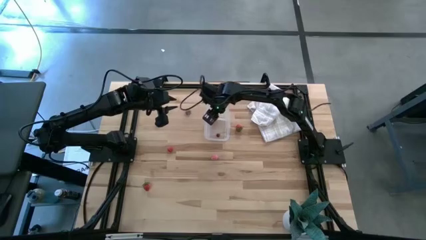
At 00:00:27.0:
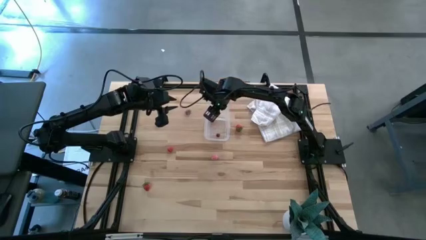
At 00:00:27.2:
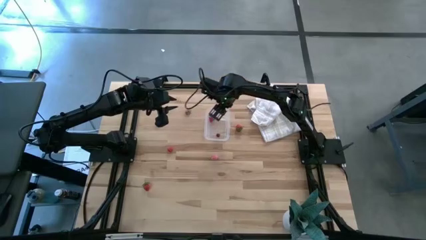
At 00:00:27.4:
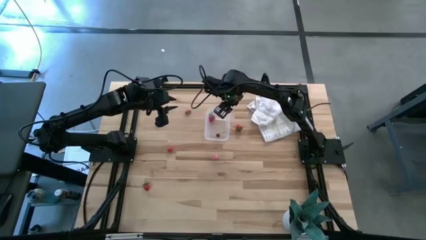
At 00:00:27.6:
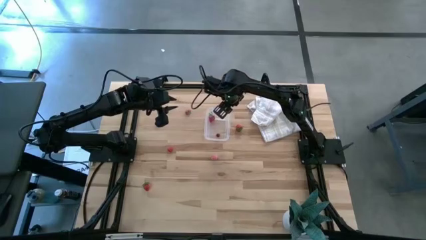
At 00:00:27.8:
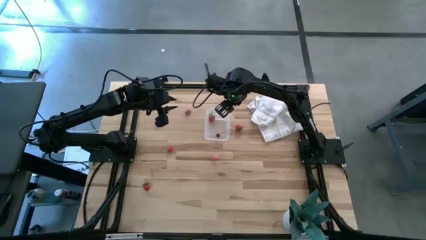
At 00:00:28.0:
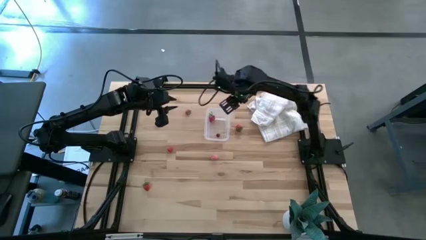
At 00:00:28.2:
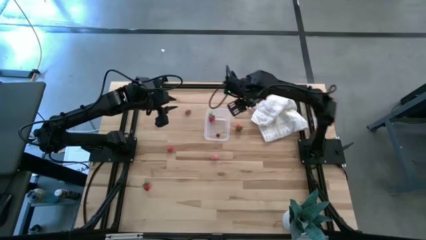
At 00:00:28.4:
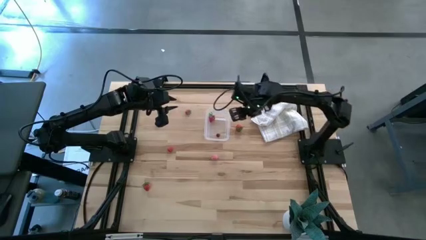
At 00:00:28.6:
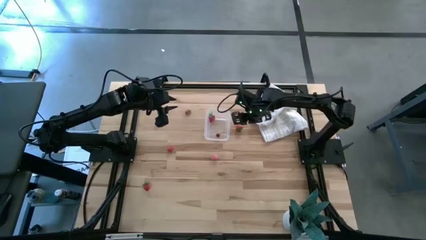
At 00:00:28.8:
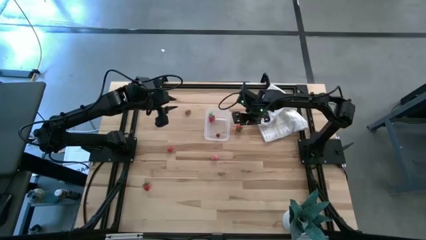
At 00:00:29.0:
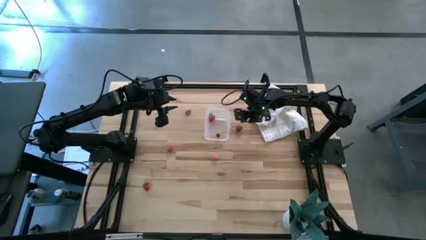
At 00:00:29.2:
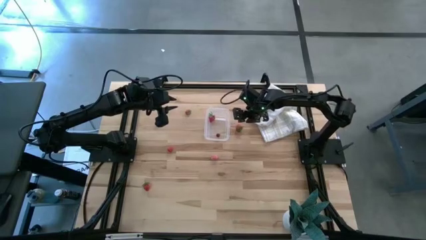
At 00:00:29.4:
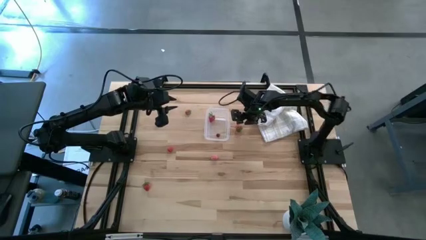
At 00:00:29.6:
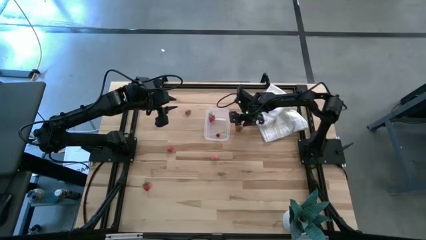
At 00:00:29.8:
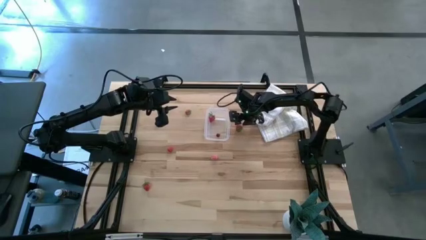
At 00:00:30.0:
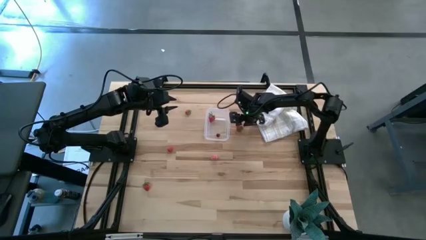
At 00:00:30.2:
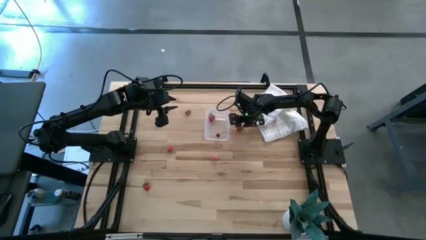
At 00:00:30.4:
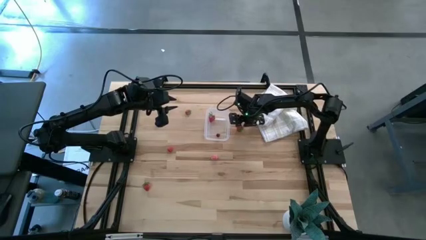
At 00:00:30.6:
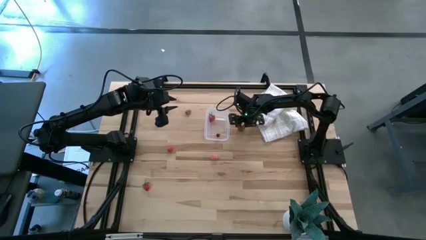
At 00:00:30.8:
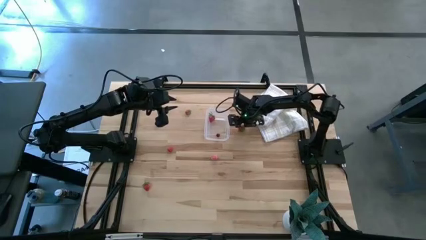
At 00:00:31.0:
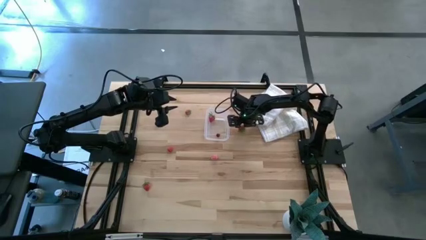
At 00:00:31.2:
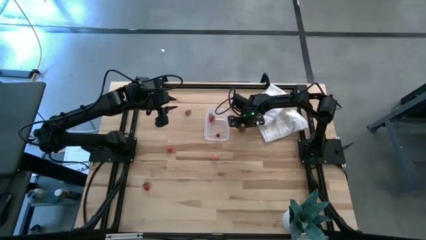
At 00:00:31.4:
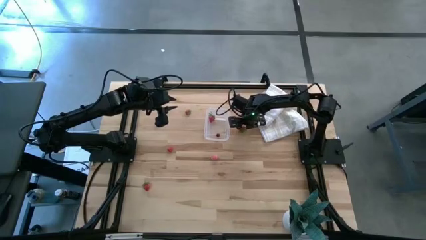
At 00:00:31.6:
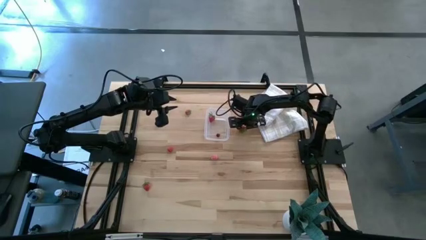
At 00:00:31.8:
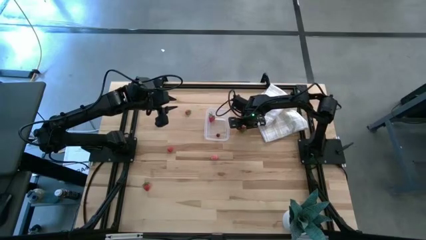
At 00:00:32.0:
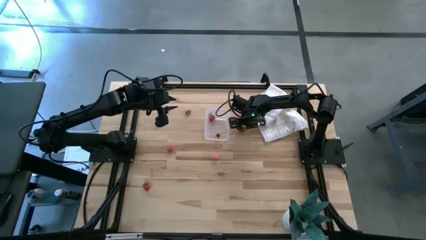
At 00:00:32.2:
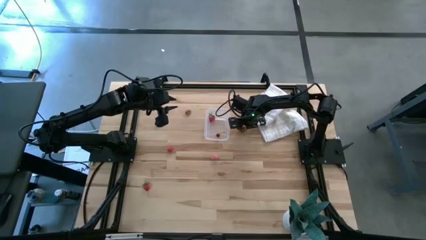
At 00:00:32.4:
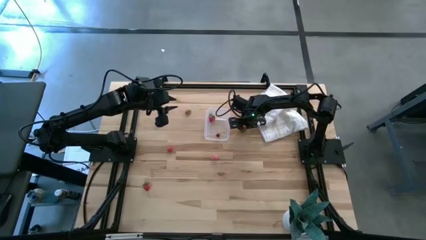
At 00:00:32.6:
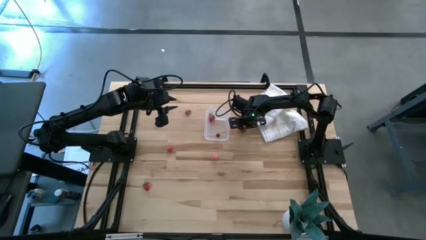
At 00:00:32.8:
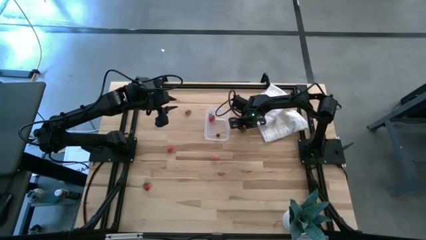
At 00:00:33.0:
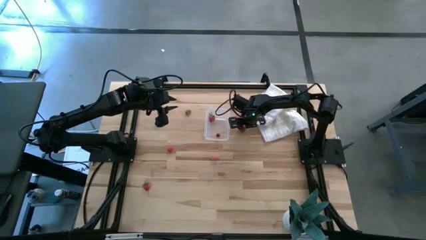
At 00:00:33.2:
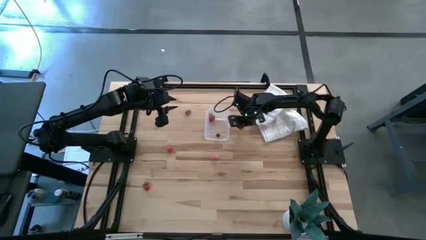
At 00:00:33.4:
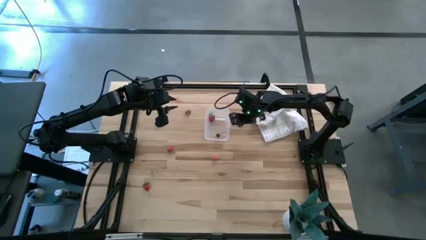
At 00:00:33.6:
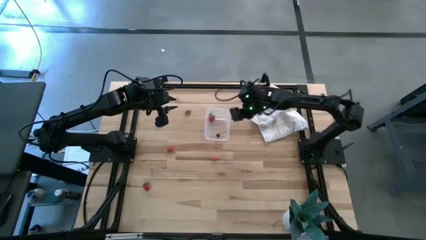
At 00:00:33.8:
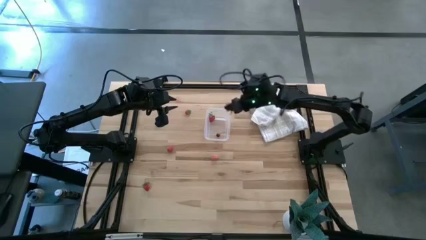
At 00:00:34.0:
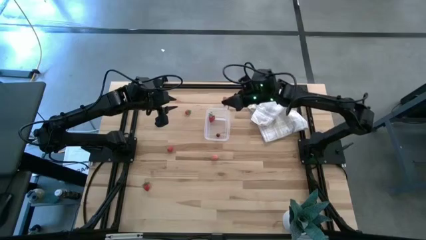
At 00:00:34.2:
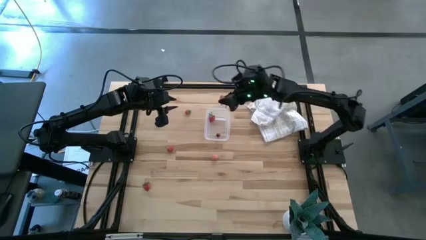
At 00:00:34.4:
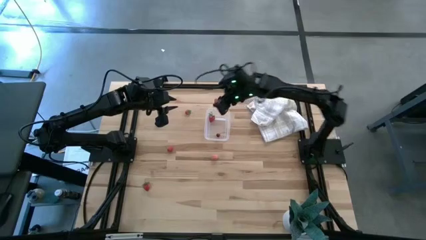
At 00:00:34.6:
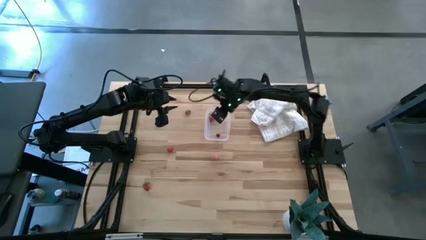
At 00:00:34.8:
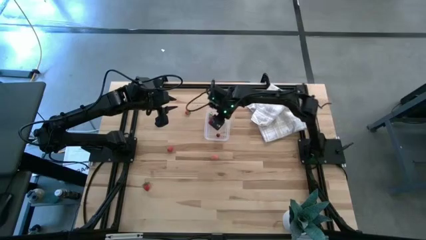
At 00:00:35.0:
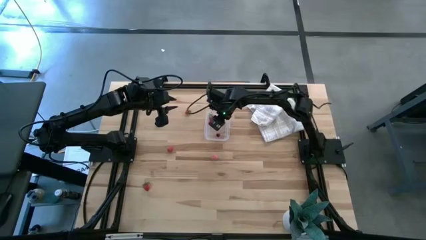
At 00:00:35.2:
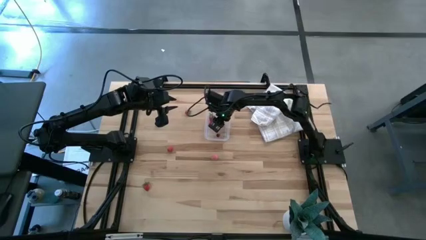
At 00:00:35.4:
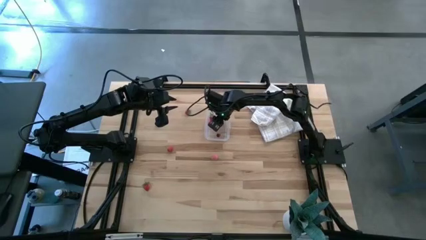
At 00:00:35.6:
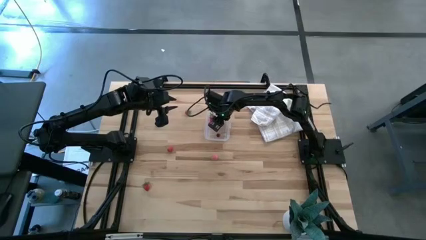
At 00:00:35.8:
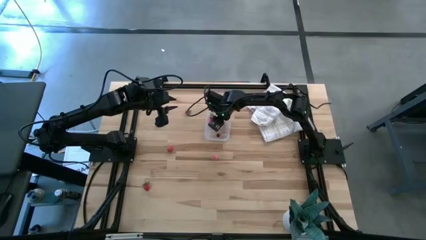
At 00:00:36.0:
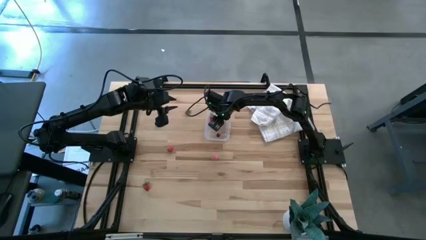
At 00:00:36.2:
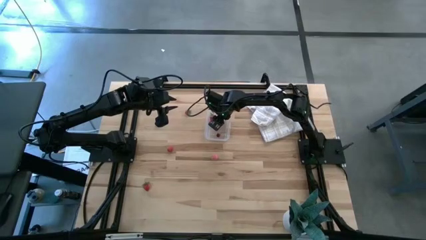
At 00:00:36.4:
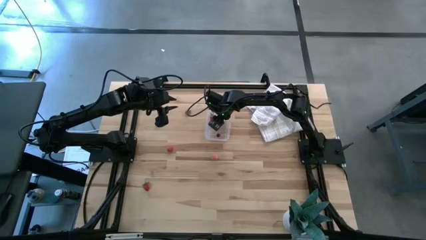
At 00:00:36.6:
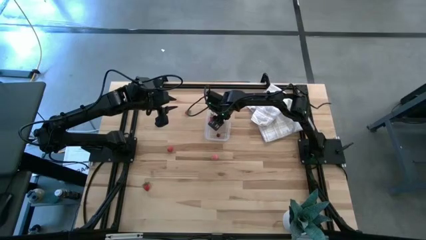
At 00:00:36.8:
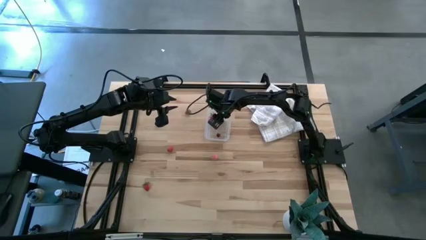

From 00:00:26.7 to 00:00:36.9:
Task: Pick and placing Produce into tupperware
Put the strawberry into the transparent container
